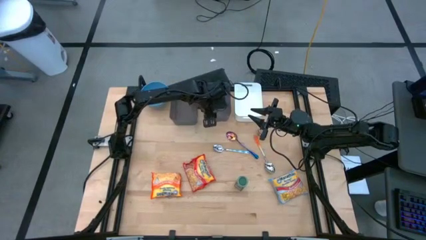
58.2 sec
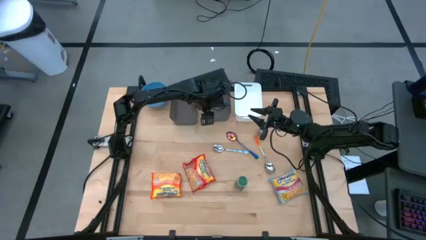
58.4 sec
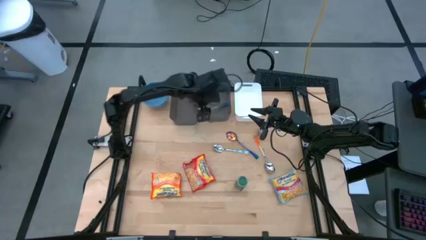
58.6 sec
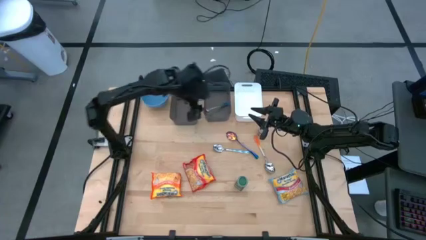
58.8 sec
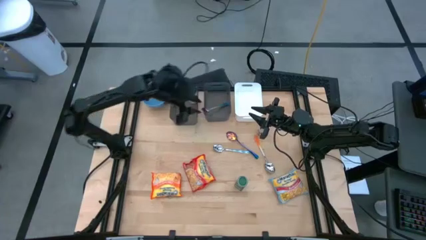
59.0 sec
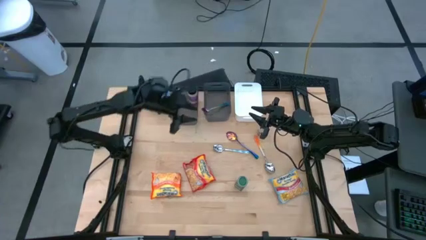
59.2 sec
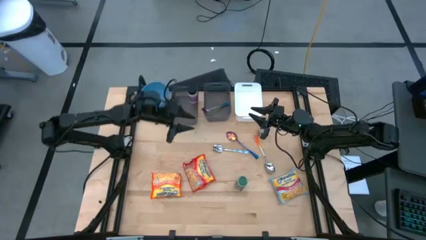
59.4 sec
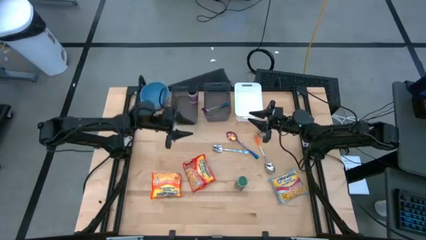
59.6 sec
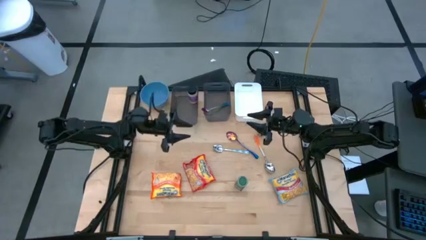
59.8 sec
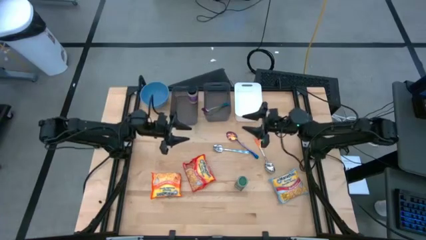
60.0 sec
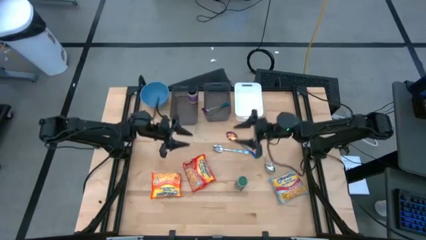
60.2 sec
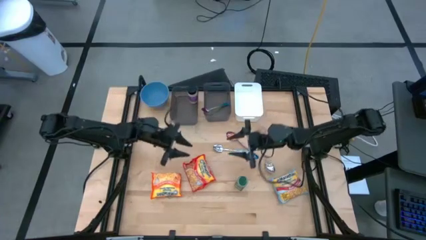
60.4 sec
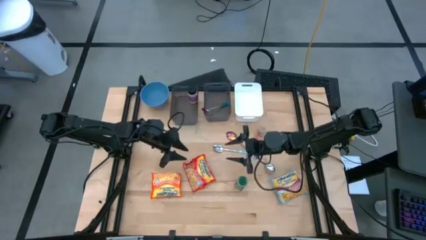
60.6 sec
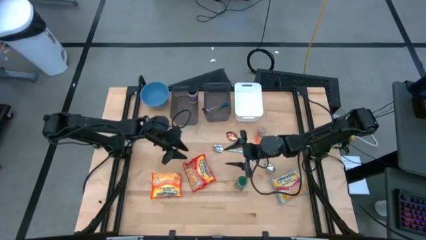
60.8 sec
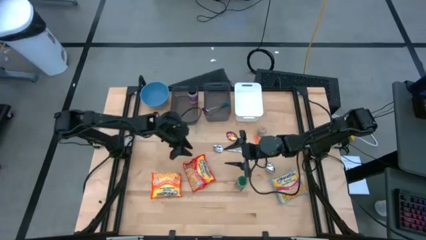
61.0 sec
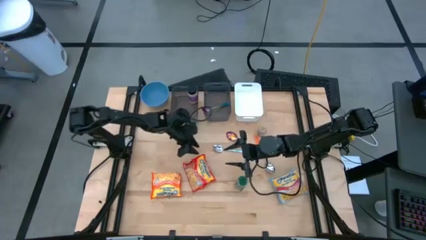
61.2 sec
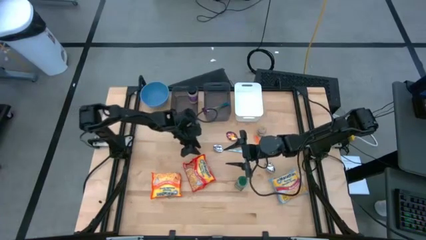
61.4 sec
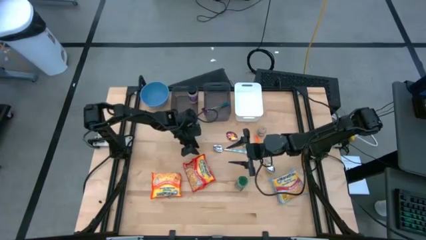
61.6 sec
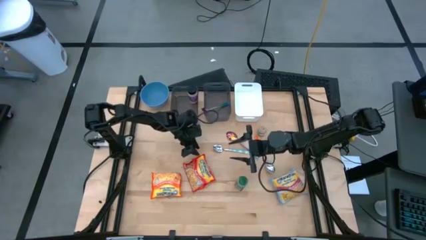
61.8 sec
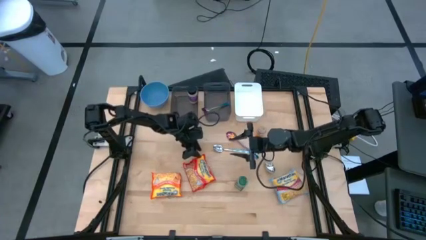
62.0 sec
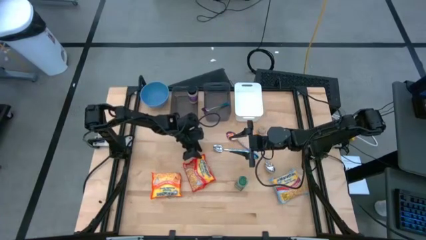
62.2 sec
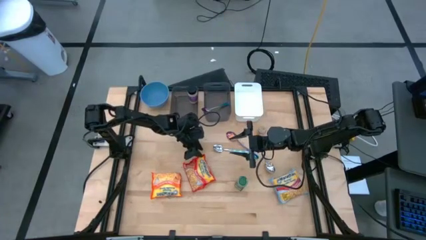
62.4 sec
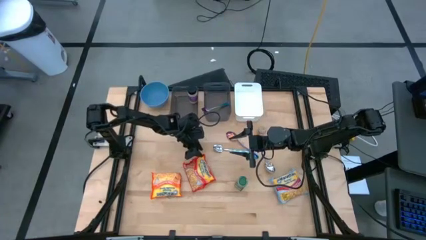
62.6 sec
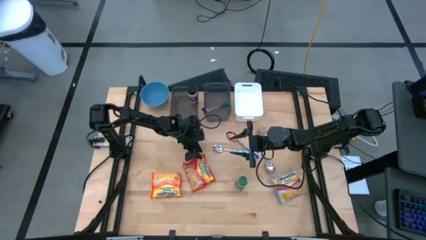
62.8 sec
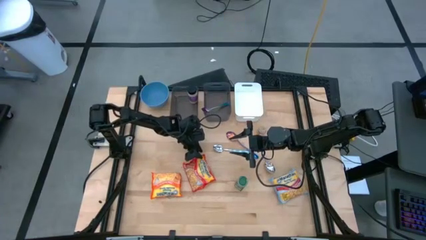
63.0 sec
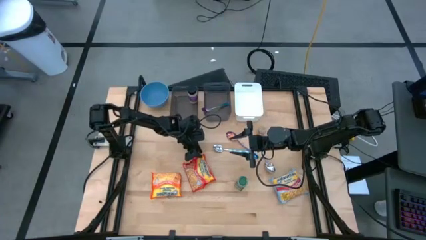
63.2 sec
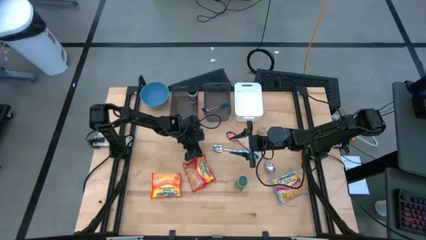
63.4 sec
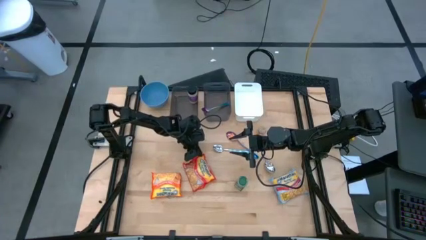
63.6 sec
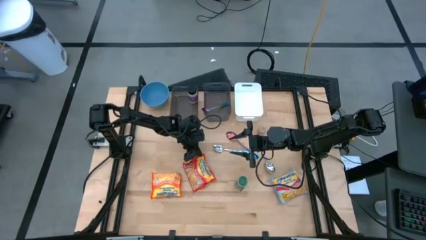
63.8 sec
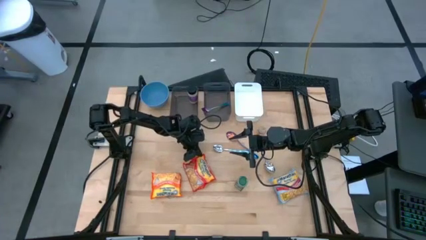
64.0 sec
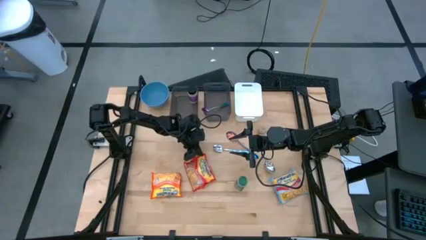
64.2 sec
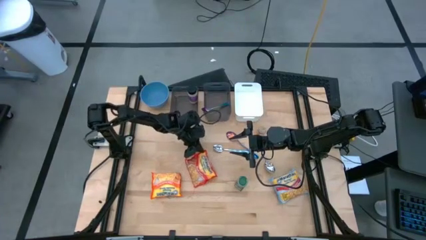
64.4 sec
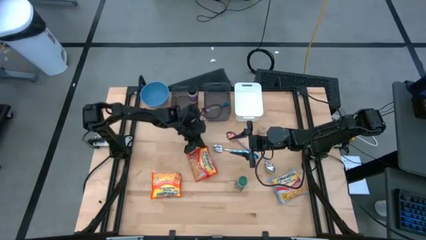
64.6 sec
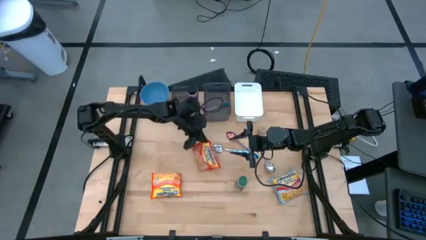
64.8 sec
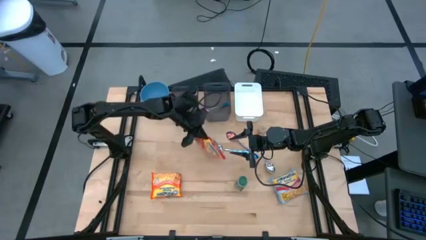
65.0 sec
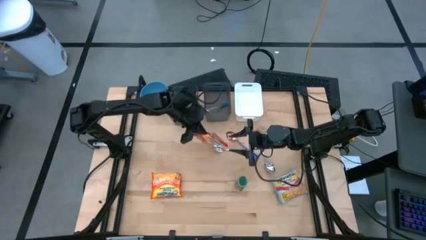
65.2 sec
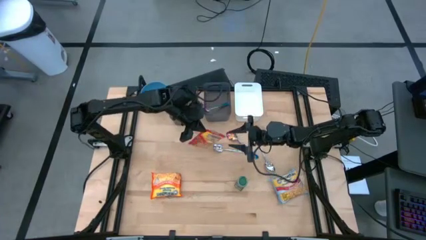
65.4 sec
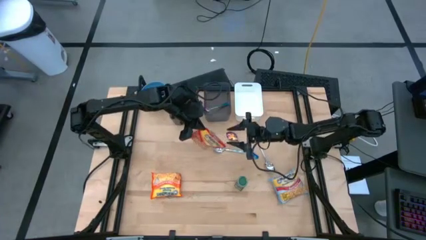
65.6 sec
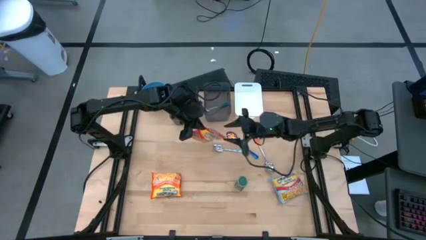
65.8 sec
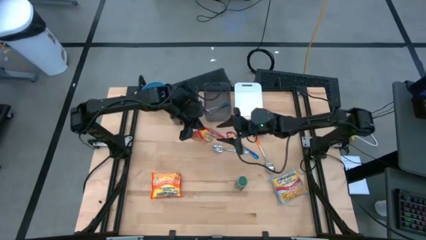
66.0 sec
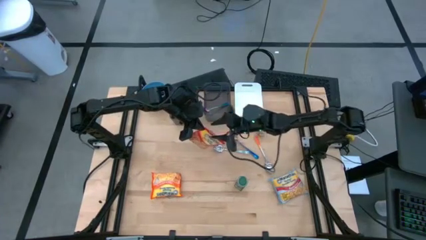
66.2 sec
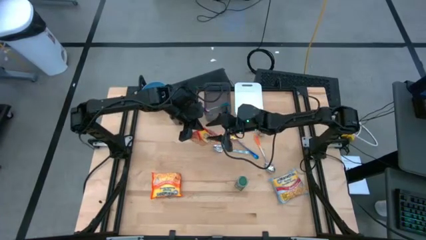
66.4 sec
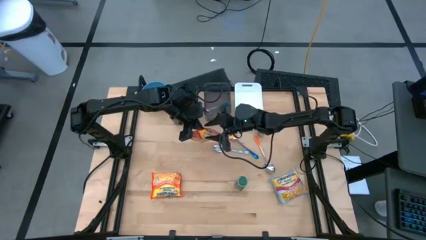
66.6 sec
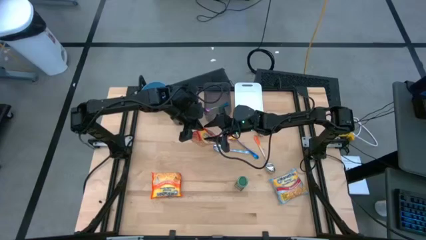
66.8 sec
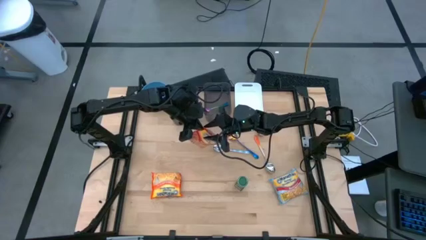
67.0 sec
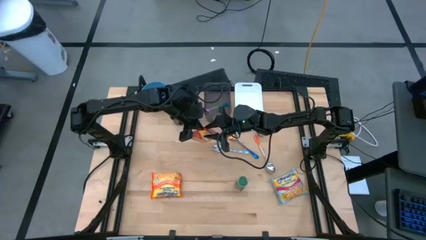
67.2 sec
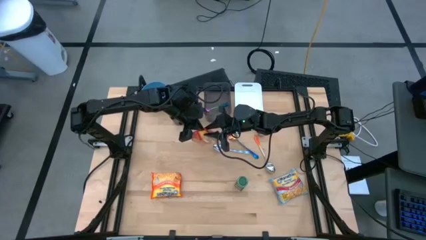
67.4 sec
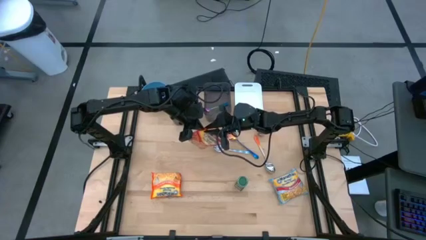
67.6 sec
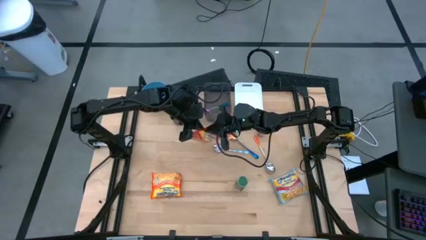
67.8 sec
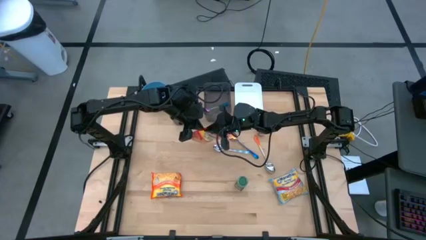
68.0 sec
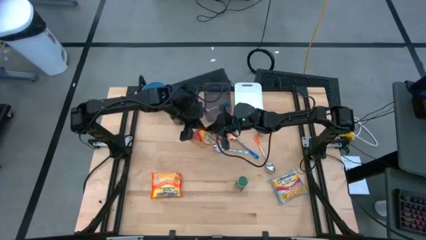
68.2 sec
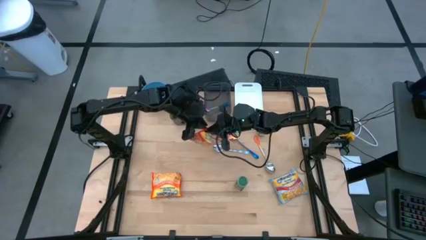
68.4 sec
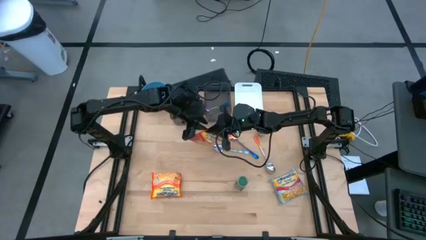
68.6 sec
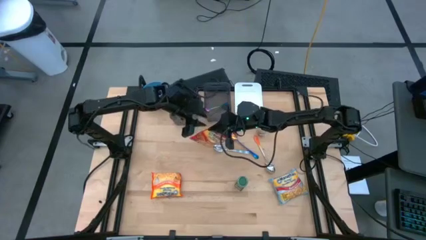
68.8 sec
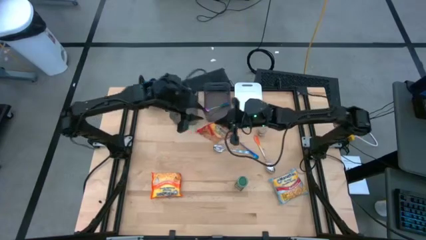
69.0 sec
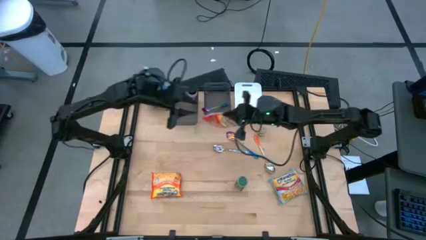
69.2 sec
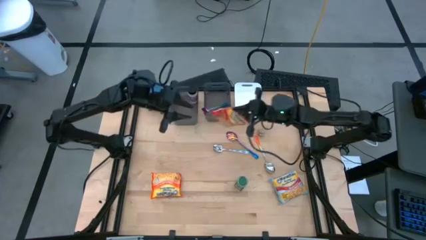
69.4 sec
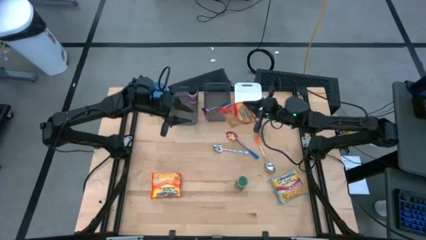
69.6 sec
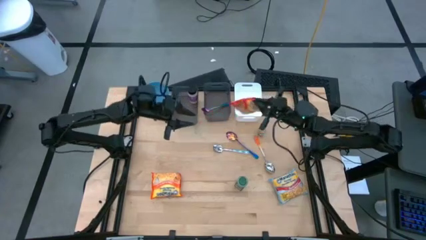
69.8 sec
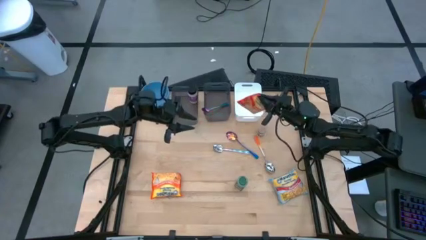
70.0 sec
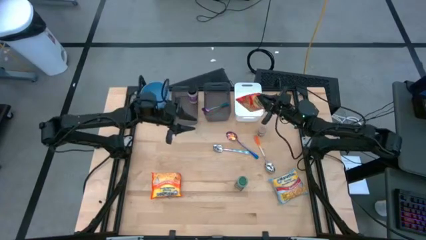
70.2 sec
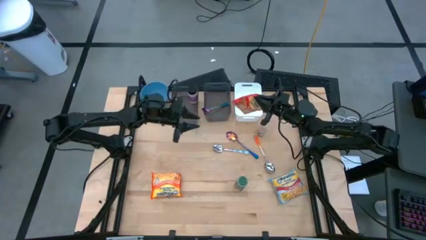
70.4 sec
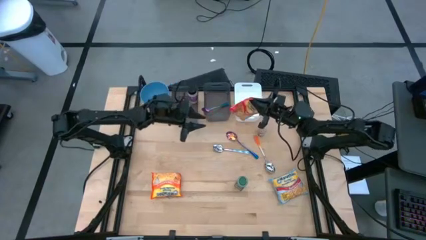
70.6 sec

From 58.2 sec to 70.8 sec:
Task: Pick & Place Food Item
Put the red noodle pack into the white bin

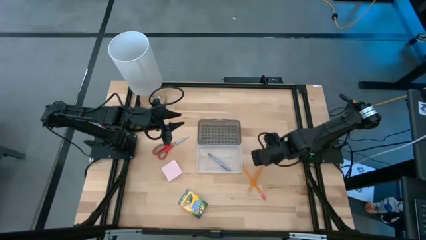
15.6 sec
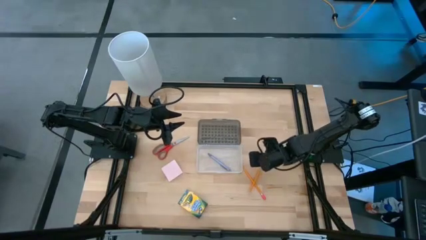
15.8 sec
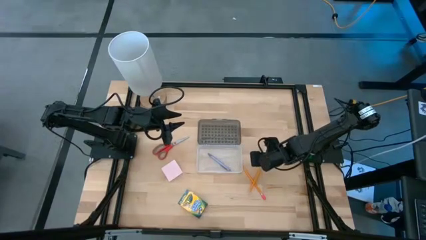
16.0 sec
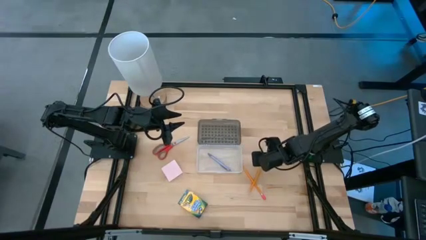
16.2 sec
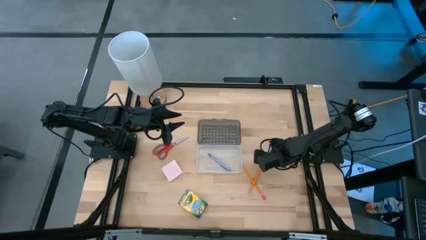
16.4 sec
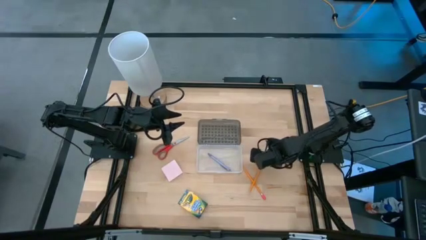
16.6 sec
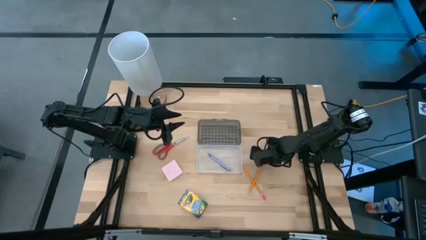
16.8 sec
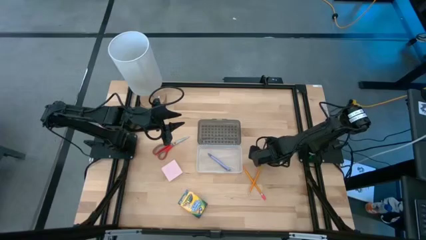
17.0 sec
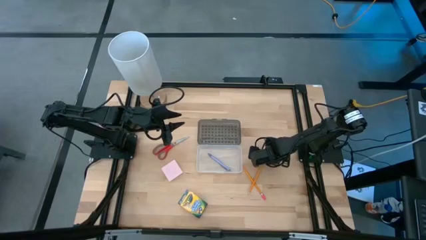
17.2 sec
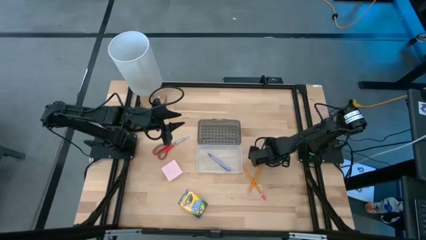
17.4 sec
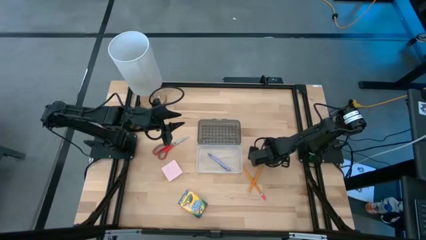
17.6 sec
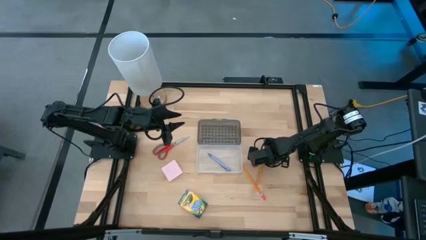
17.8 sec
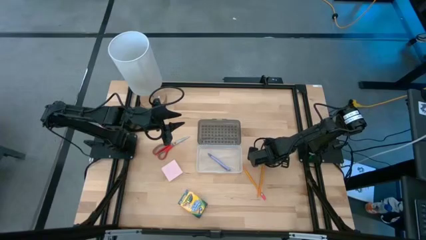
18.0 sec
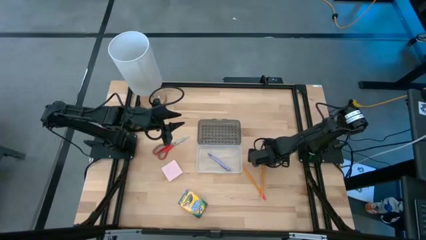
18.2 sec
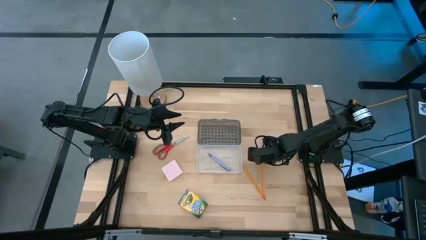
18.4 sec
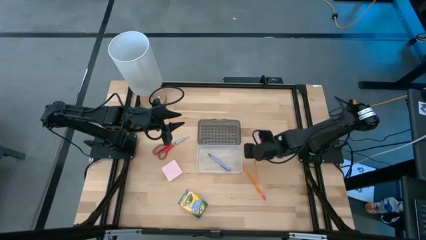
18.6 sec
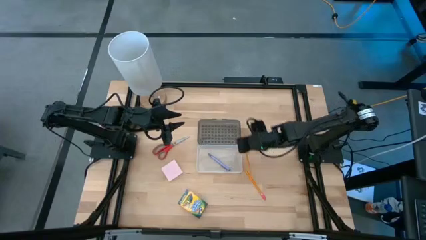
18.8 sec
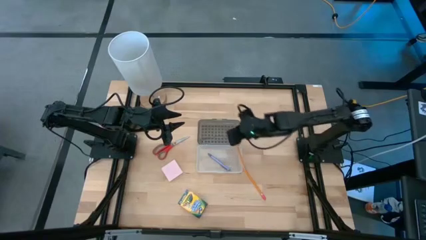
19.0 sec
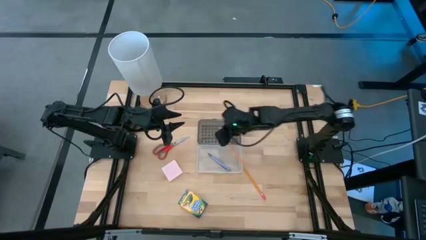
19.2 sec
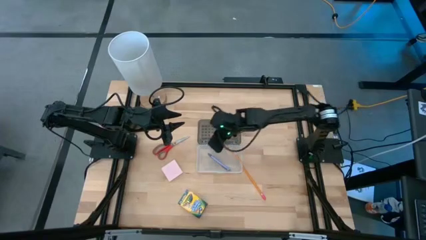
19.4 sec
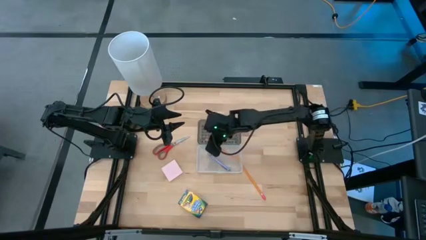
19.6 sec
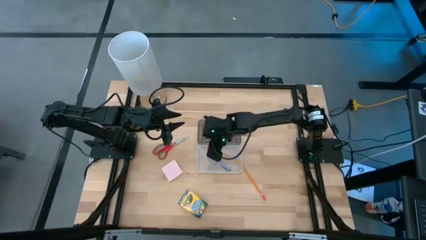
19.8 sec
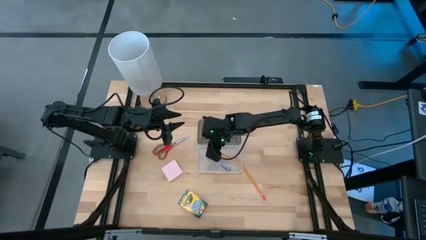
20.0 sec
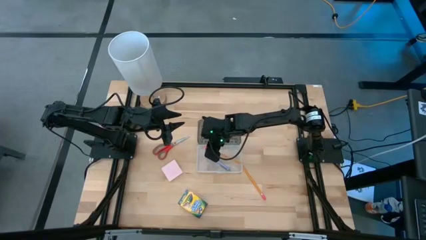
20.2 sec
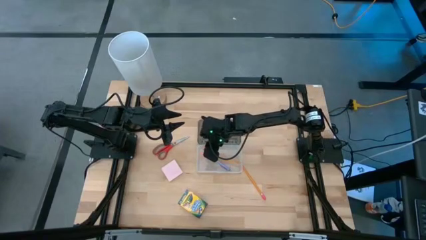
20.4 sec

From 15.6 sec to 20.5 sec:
Task: Pack school essentials
Put the orange pencil into the transparent supply box
